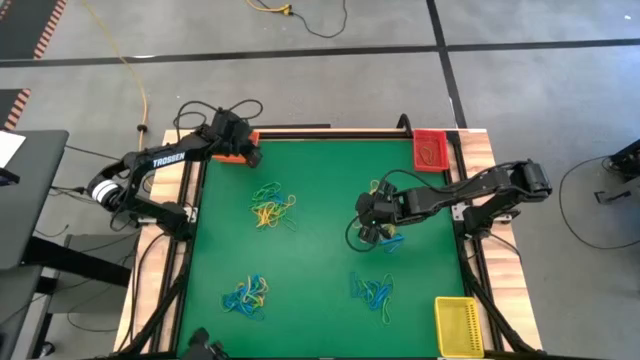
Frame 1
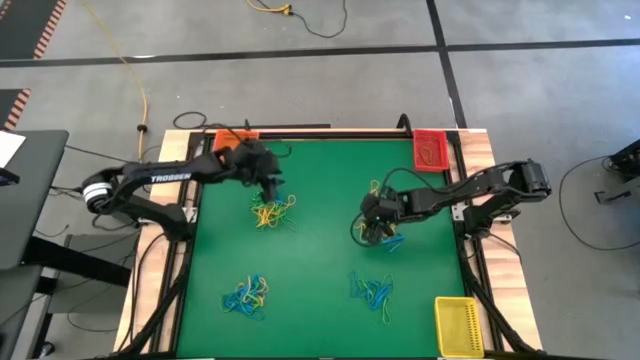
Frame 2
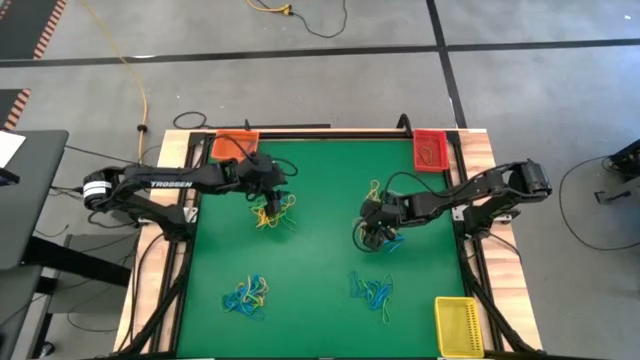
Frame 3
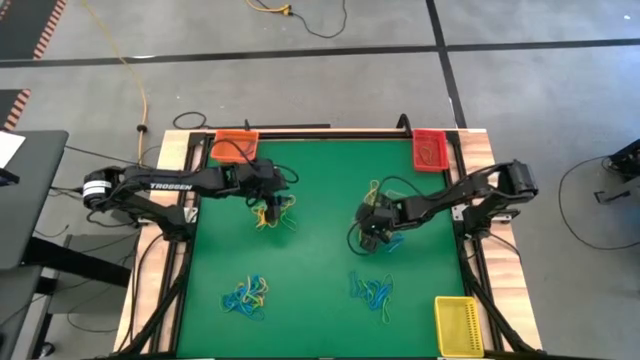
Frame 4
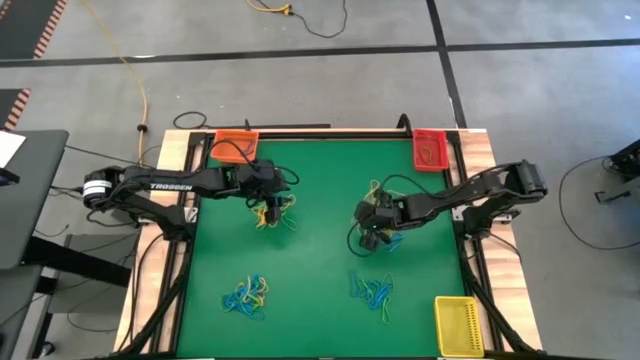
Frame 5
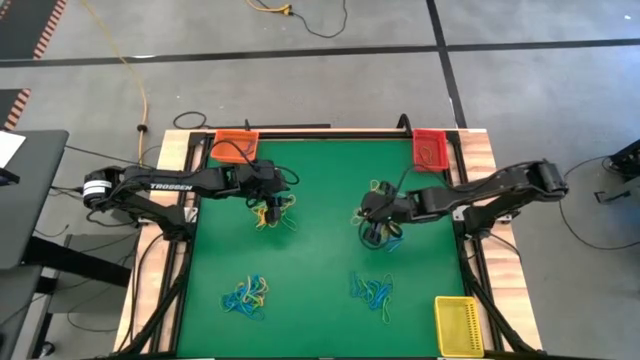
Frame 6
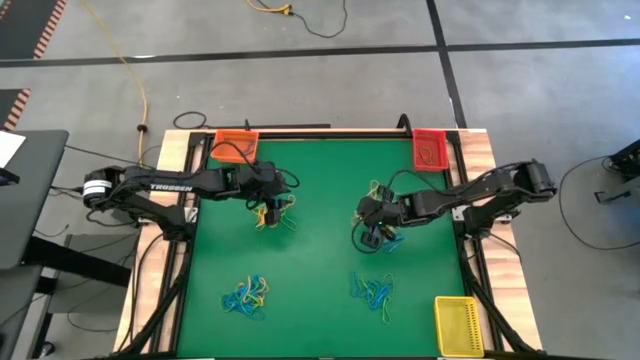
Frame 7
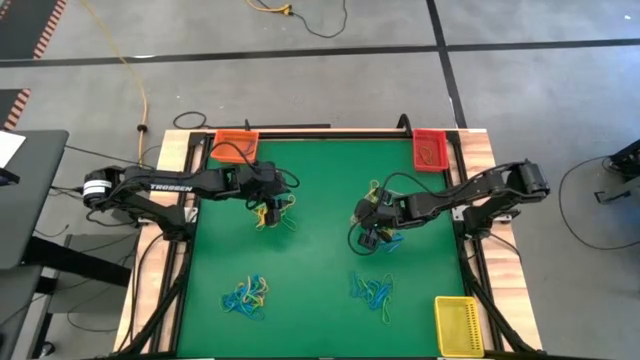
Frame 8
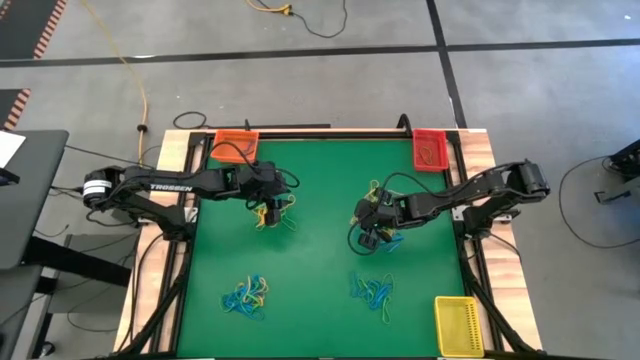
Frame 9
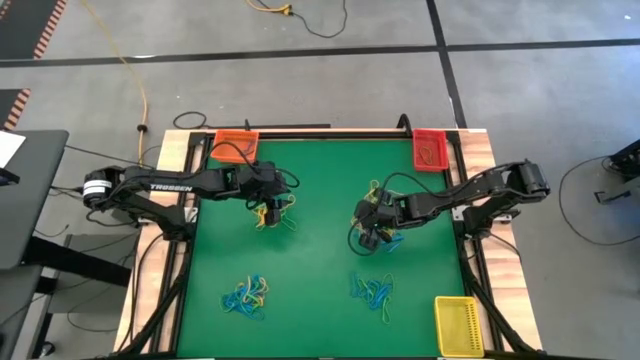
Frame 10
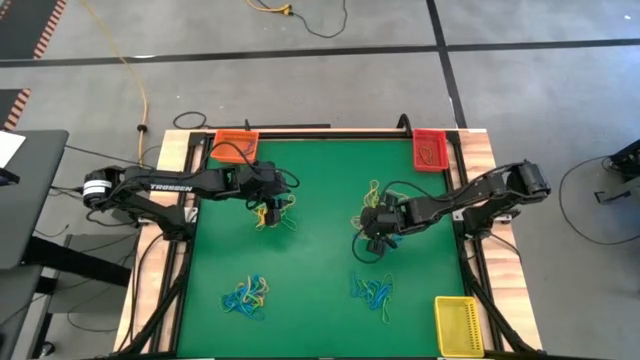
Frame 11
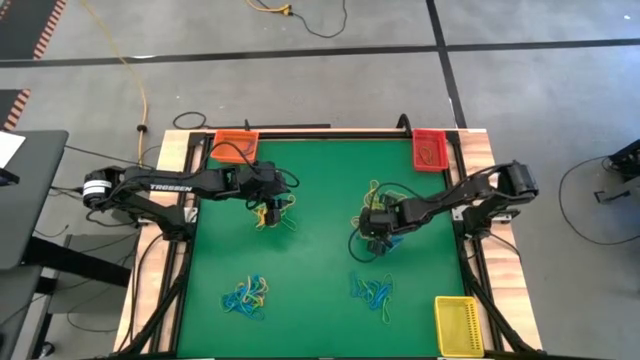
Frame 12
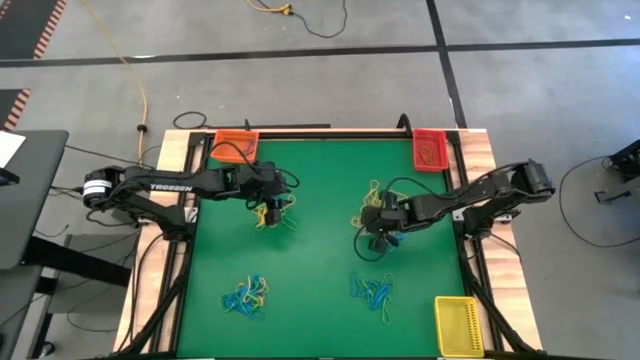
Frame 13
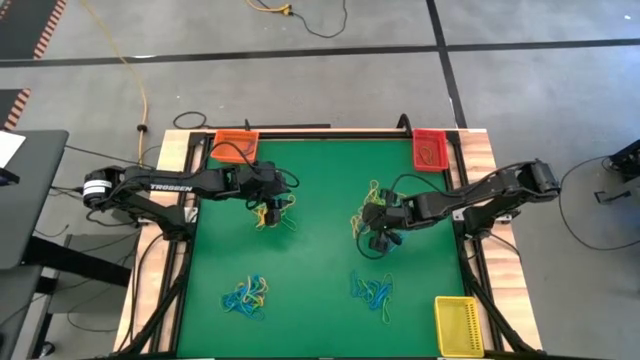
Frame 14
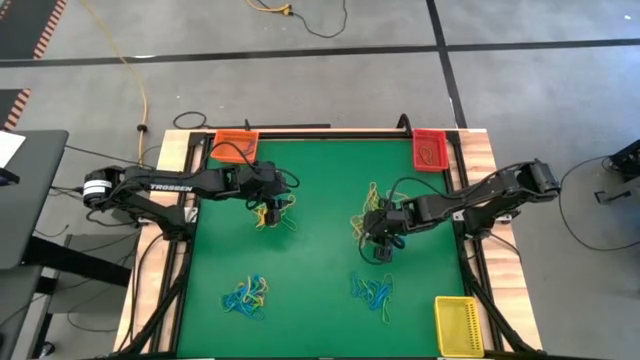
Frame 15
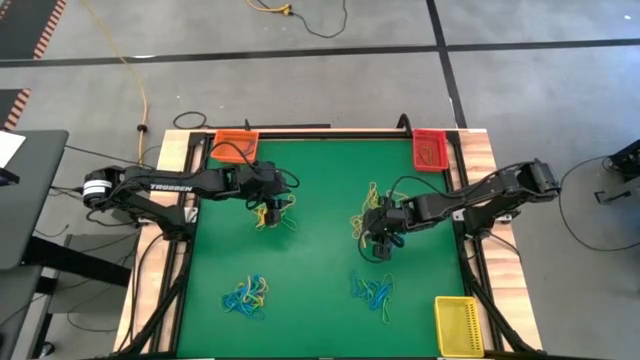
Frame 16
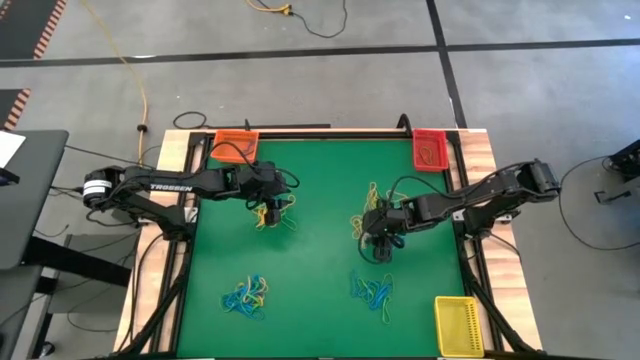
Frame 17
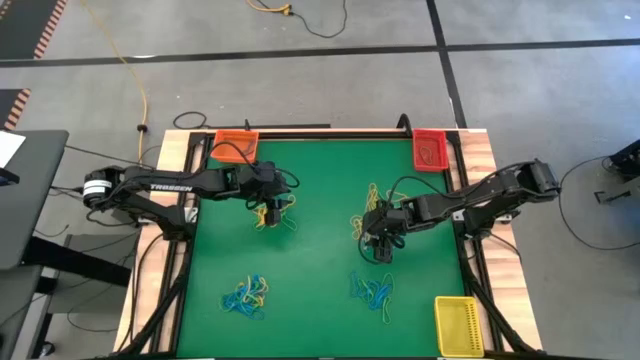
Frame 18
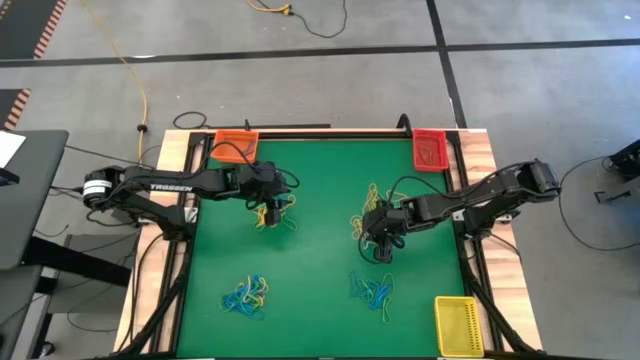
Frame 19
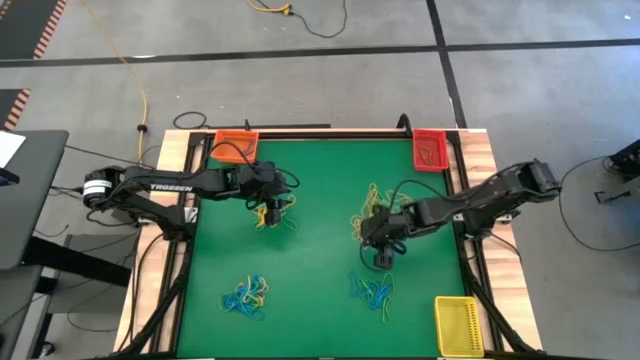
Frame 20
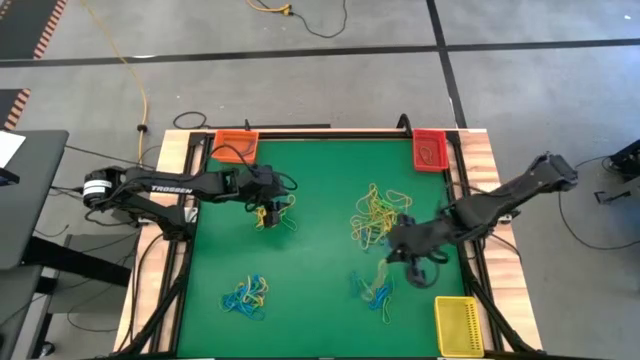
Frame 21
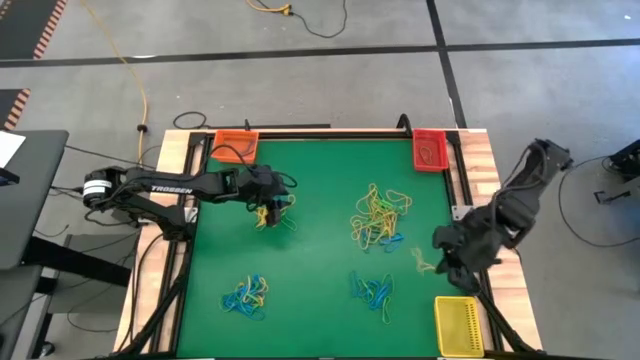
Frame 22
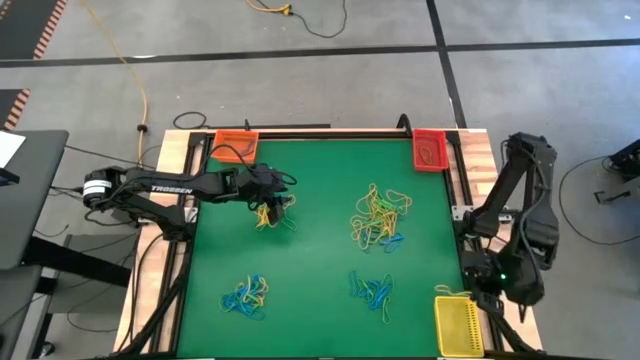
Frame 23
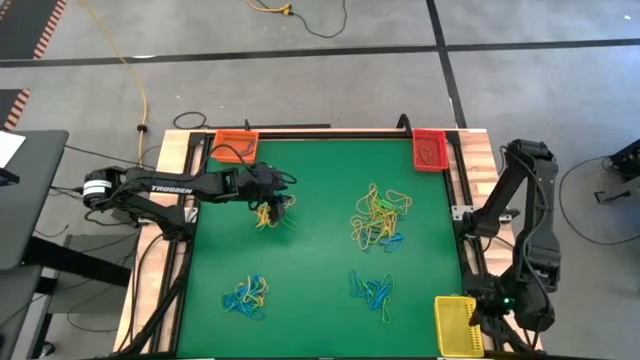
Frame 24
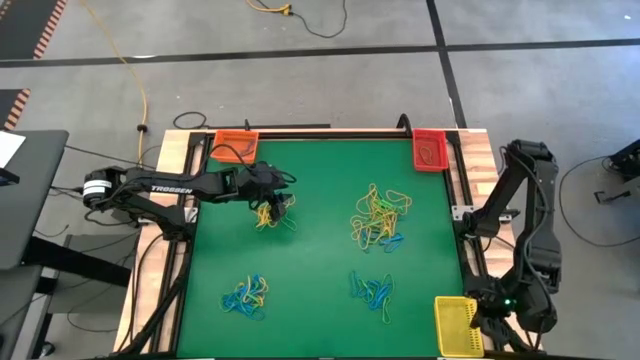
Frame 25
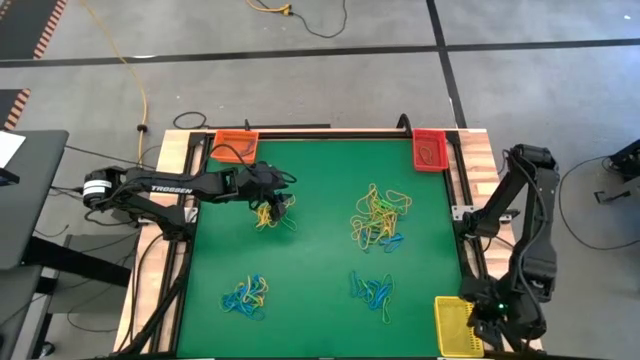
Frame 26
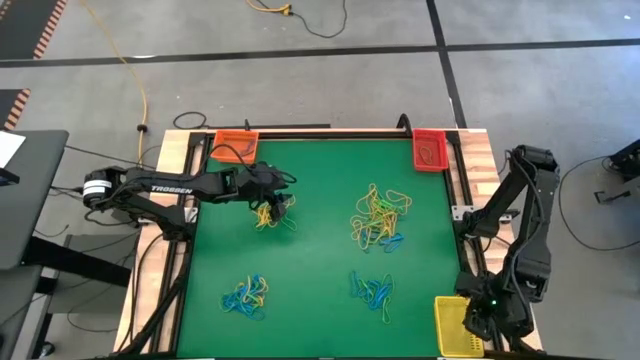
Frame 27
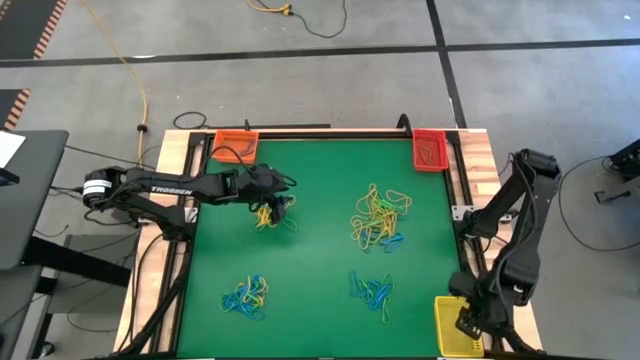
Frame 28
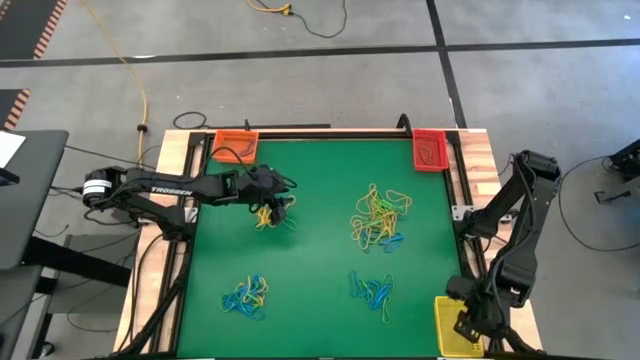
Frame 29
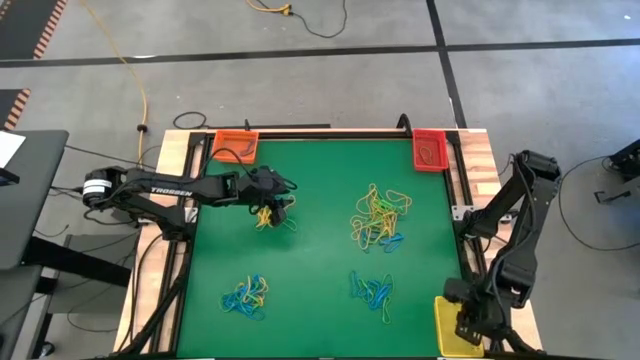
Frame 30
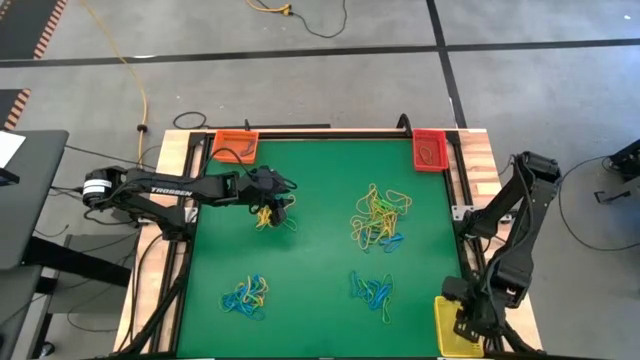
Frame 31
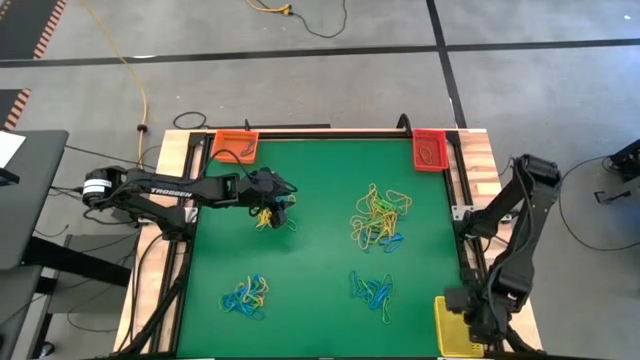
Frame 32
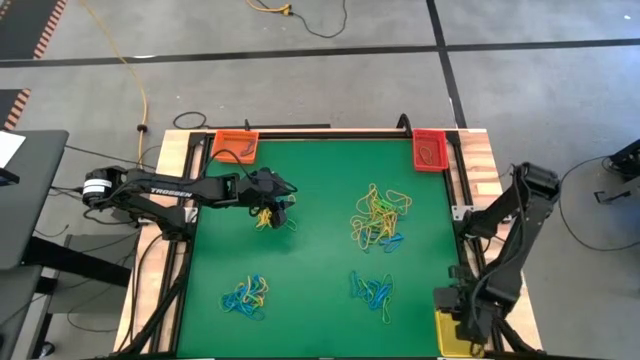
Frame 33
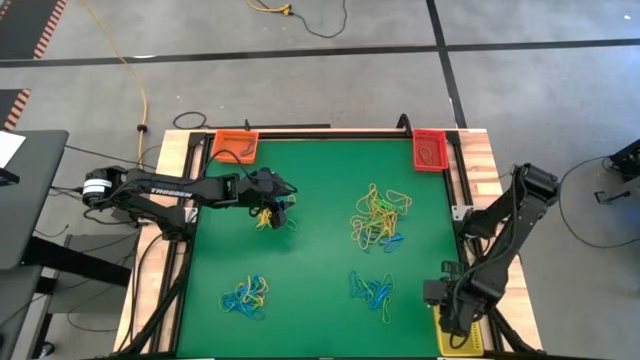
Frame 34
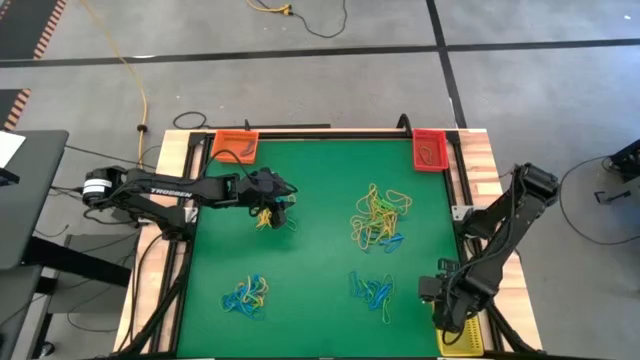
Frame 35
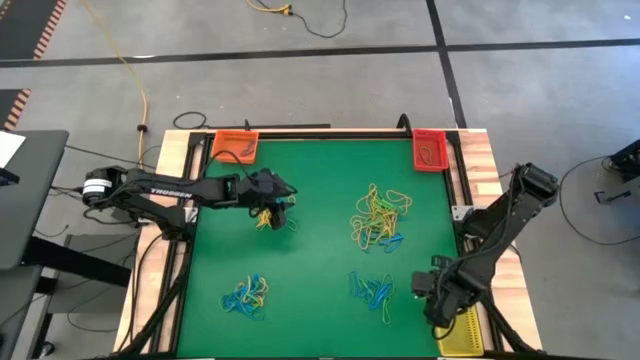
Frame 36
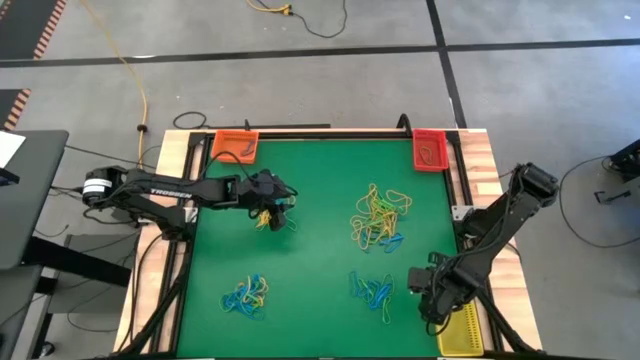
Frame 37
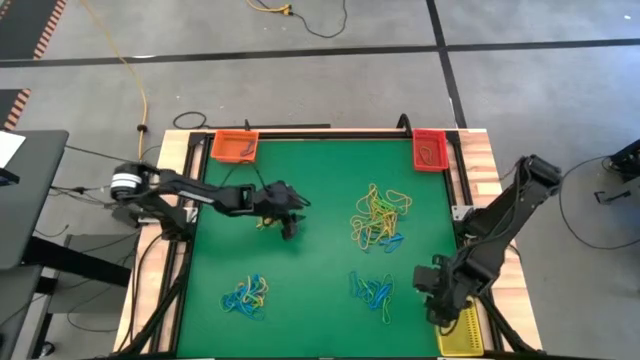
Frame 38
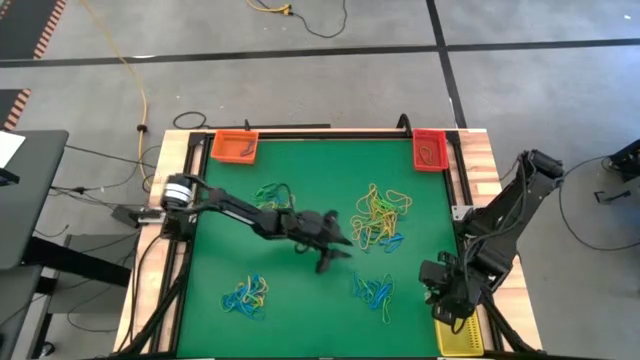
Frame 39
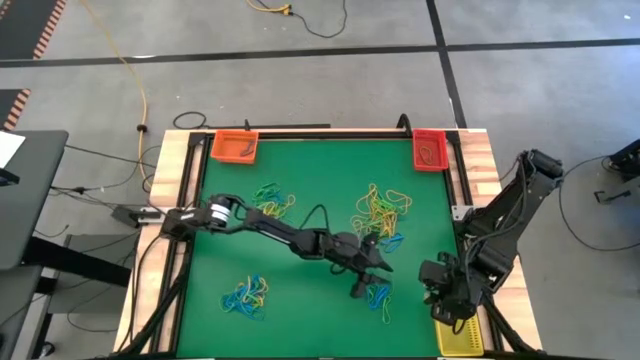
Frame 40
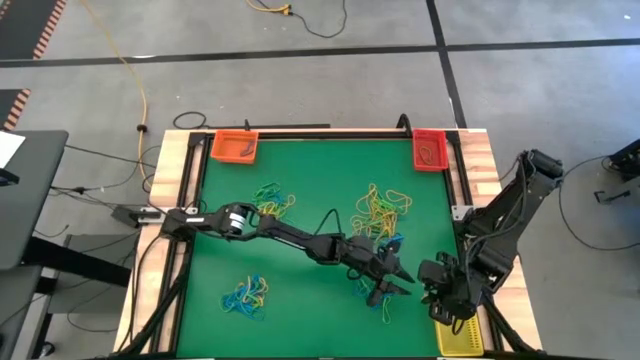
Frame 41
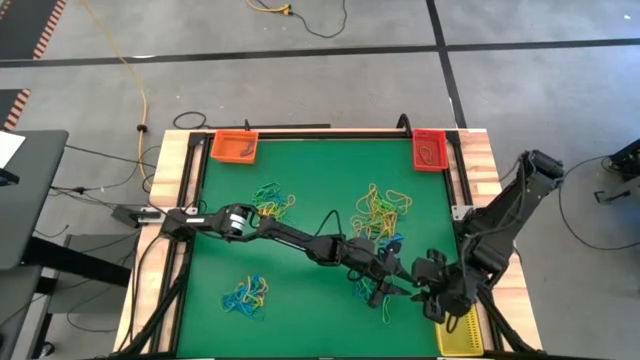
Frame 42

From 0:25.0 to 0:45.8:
Task: Sort rubber bands into baskets
Put the top right yellow rubber band into the yellow bin
